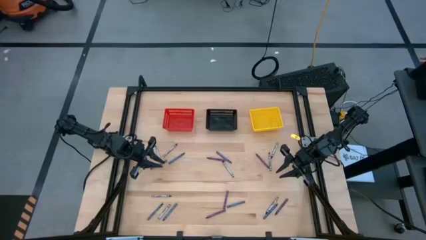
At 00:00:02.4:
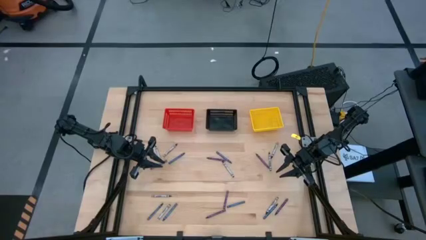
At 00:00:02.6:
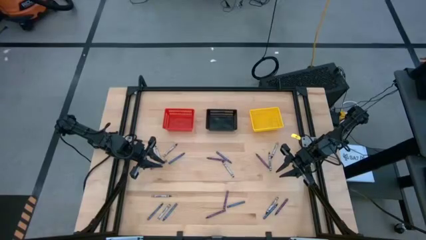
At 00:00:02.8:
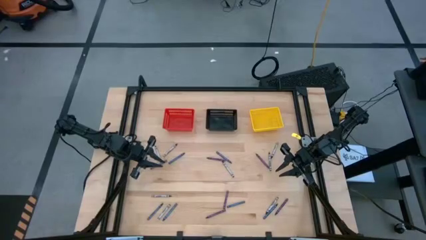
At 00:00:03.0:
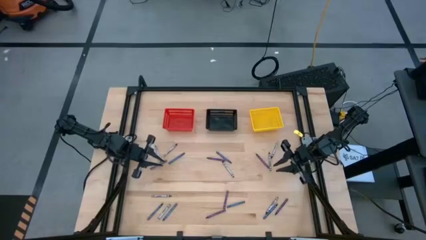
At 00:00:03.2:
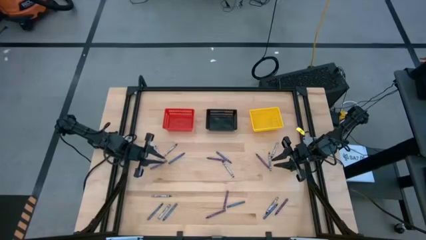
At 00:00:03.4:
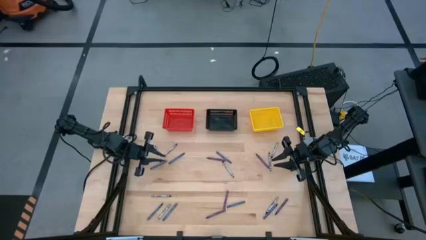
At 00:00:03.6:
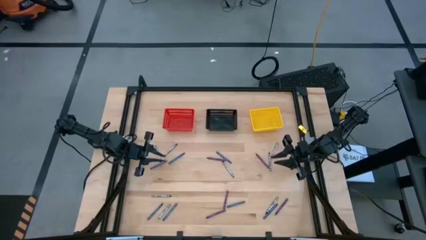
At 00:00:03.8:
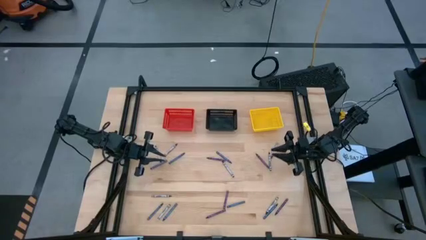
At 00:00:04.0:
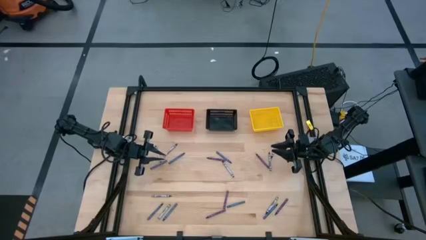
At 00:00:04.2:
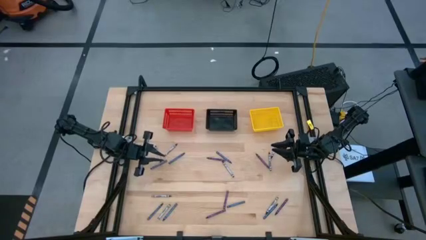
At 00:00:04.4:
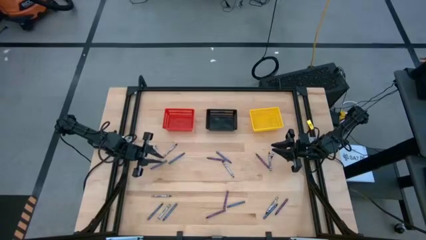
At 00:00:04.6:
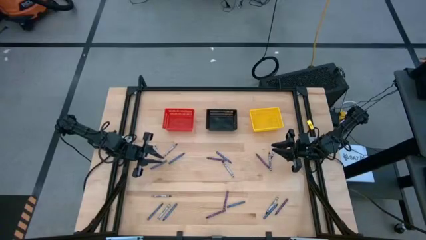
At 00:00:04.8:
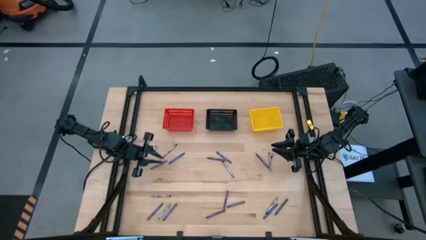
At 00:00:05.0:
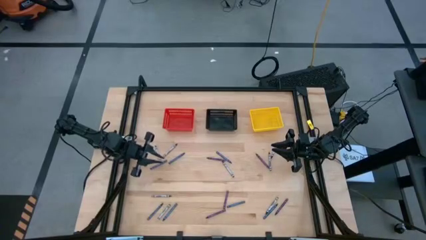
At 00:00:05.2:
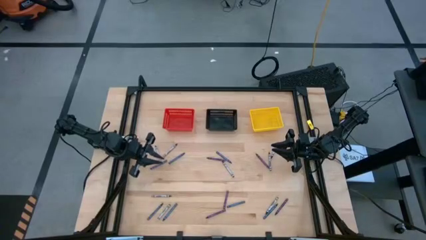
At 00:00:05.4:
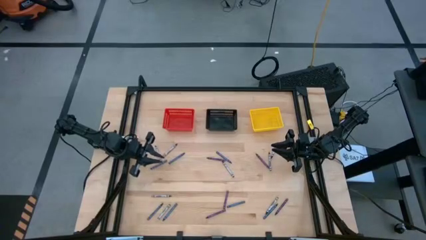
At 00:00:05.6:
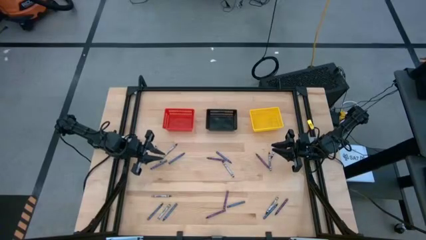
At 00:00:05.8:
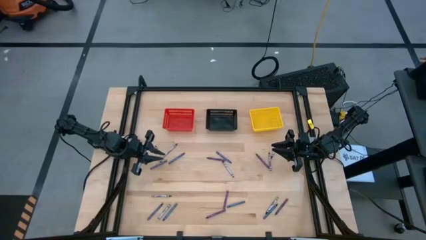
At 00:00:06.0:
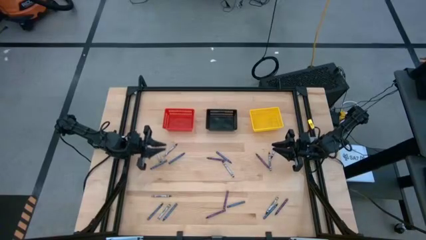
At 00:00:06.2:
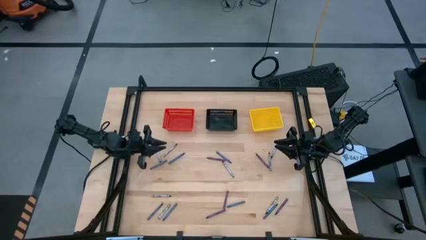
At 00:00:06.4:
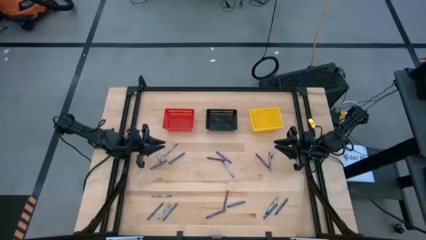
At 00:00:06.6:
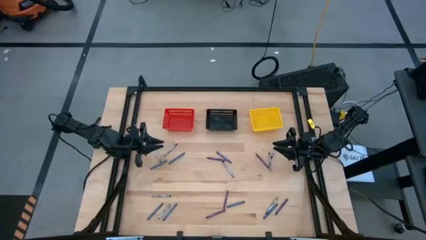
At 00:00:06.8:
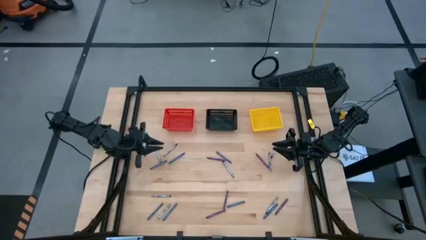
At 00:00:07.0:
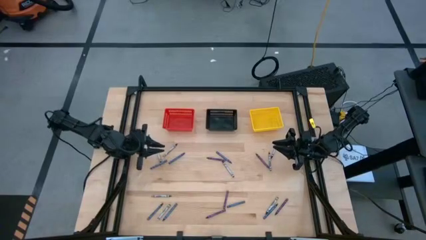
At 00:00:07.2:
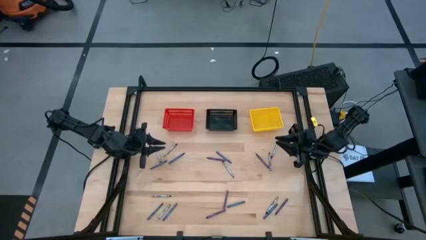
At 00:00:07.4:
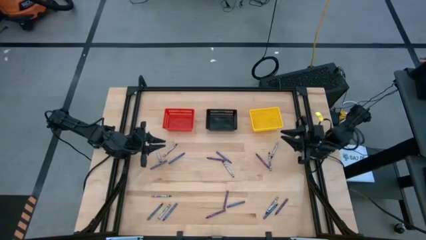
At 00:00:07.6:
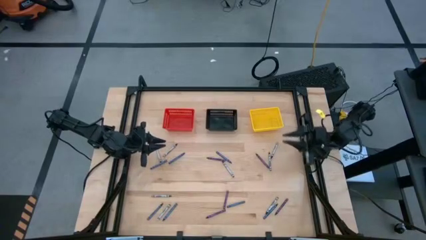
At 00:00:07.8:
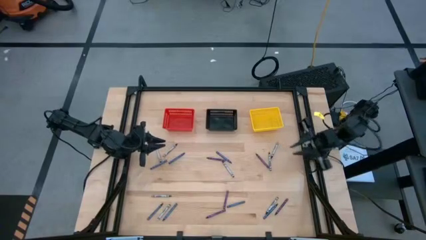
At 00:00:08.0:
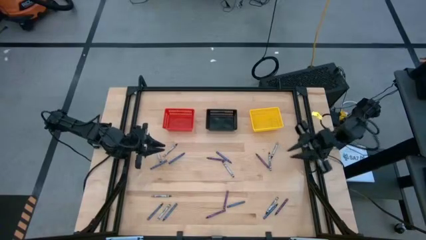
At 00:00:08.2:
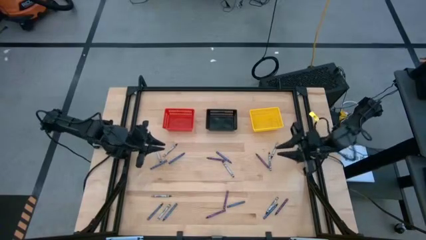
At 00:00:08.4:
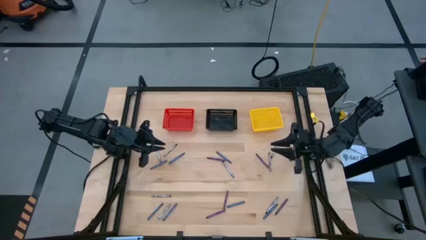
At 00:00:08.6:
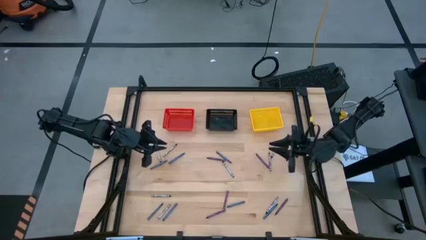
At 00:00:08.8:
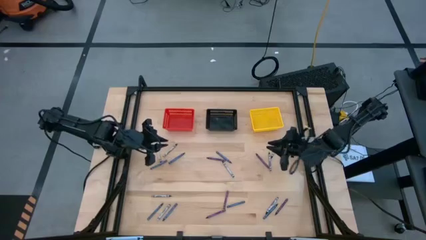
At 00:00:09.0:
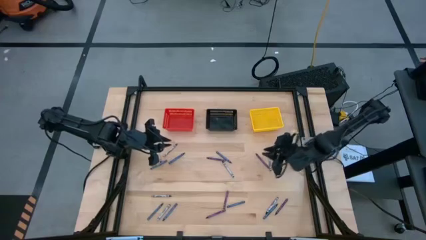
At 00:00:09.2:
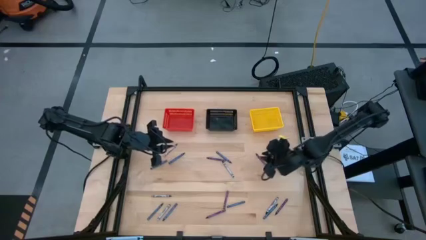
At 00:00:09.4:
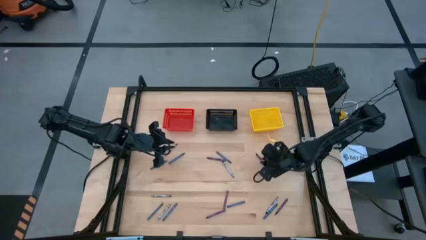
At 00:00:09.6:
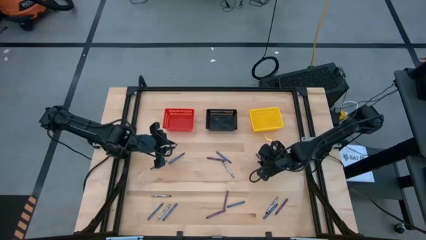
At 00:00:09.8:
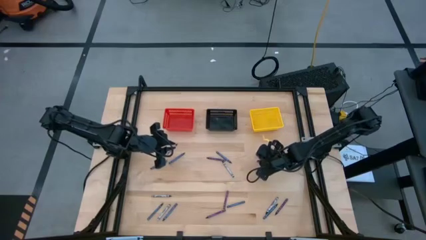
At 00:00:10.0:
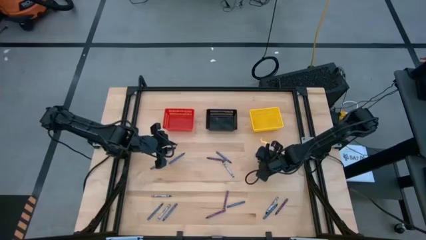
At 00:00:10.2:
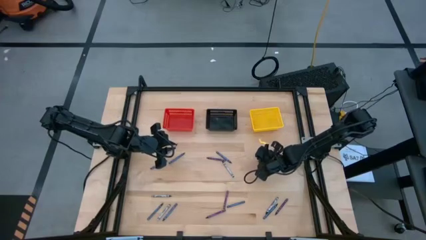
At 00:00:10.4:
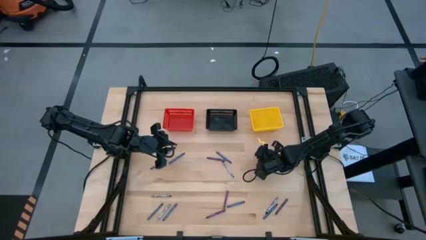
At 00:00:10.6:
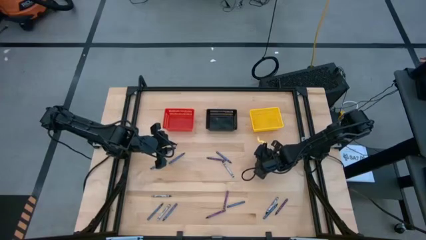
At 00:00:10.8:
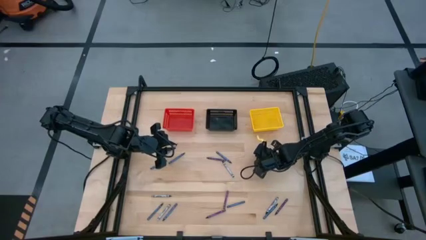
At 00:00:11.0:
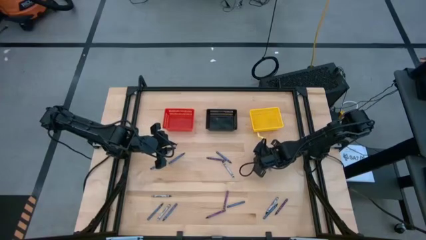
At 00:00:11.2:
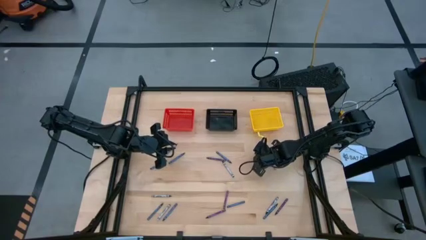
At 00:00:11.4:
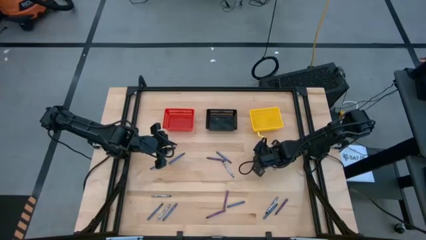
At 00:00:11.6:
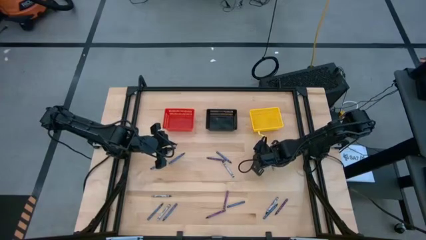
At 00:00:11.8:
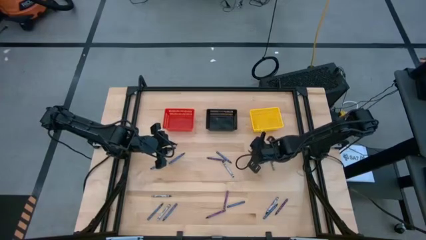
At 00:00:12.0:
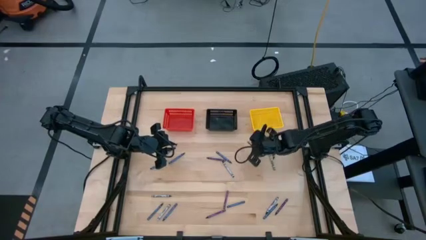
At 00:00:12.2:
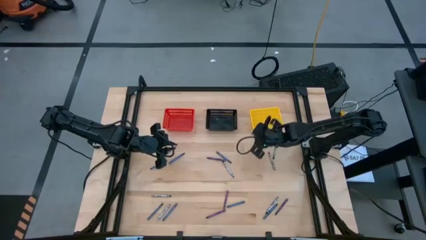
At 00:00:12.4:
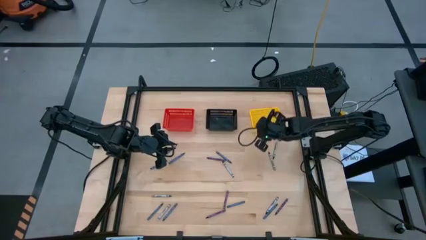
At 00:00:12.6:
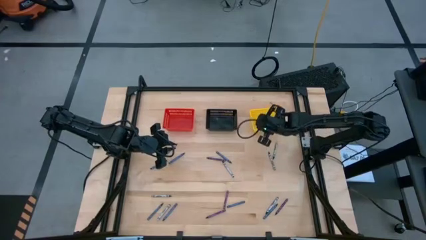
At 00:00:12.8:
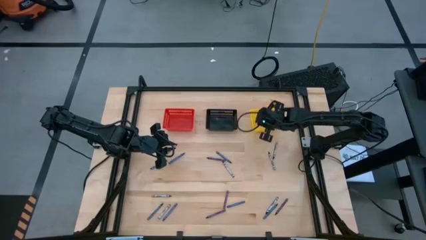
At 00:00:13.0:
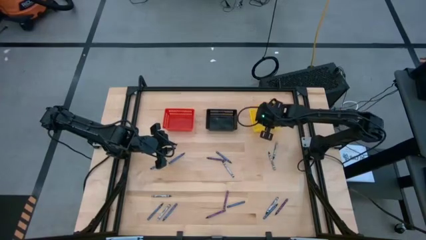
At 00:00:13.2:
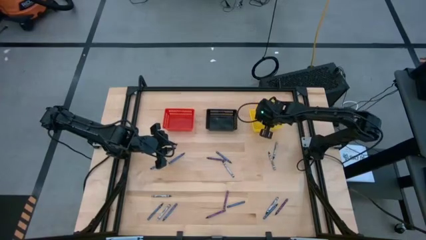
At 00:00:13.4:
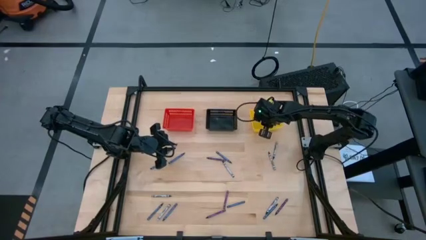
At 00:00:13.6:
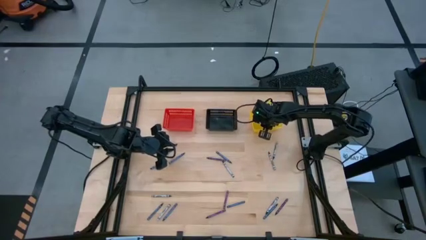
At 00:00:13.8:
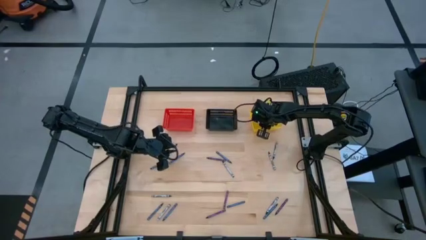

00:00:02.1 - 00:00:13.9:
Task: Sort crayons
Put the purple crayon into the yellow basket

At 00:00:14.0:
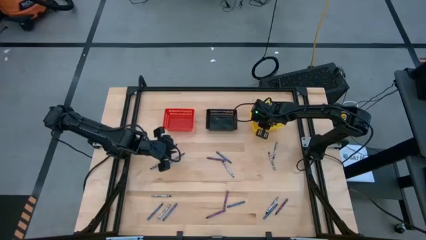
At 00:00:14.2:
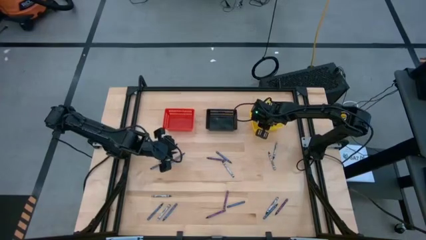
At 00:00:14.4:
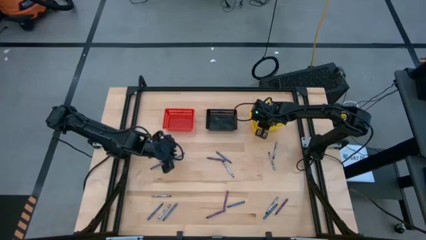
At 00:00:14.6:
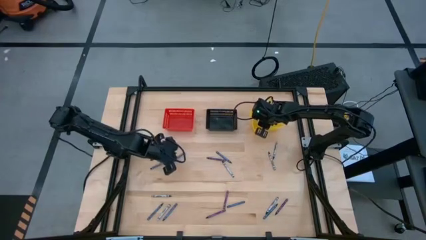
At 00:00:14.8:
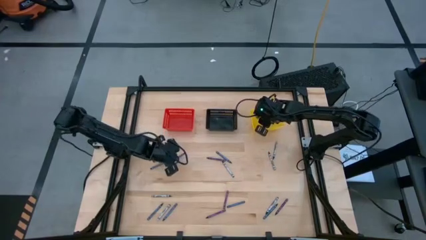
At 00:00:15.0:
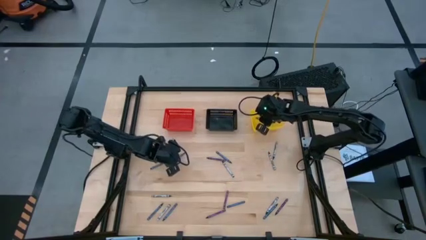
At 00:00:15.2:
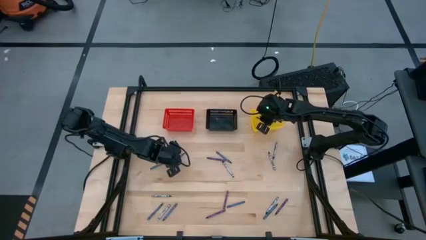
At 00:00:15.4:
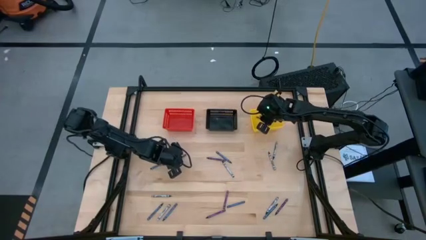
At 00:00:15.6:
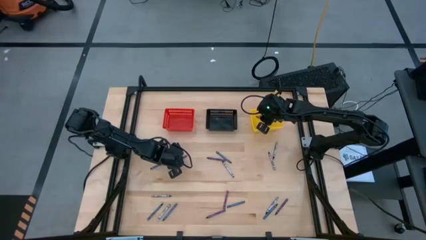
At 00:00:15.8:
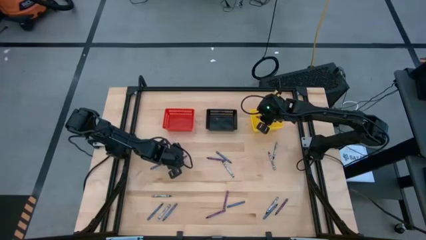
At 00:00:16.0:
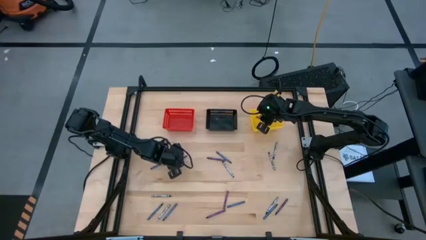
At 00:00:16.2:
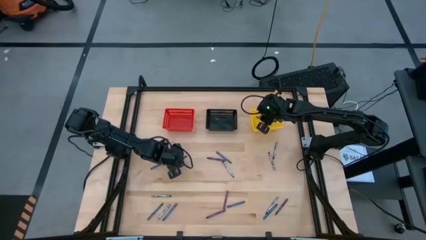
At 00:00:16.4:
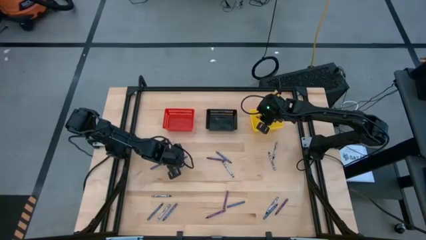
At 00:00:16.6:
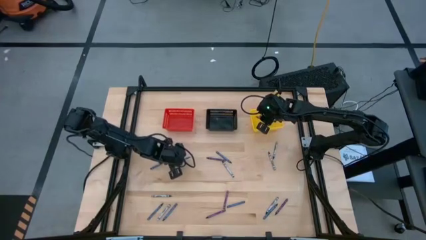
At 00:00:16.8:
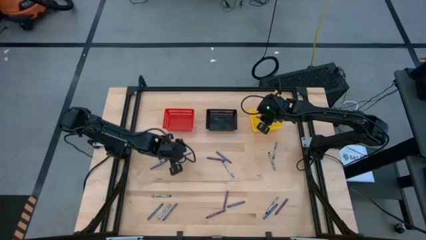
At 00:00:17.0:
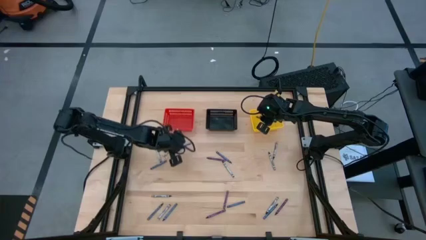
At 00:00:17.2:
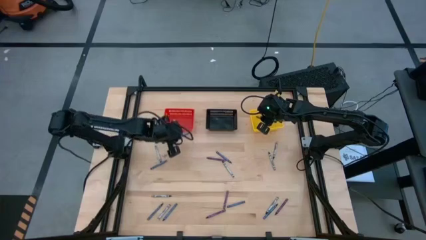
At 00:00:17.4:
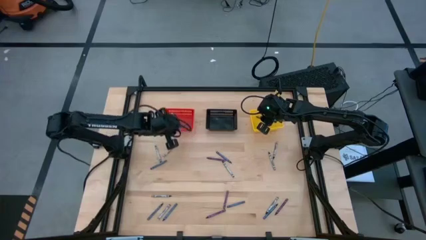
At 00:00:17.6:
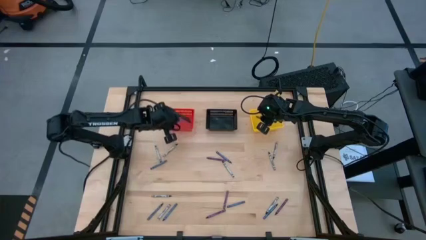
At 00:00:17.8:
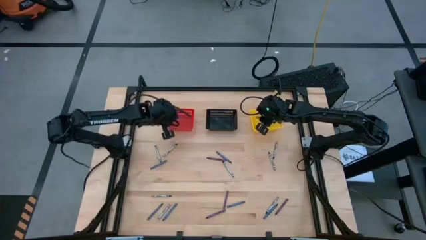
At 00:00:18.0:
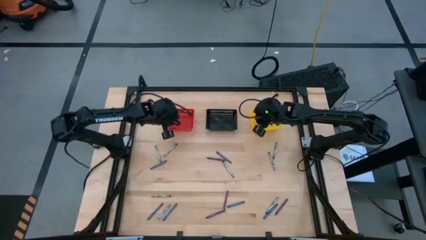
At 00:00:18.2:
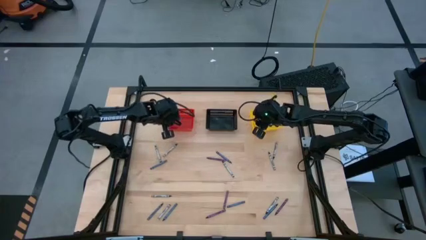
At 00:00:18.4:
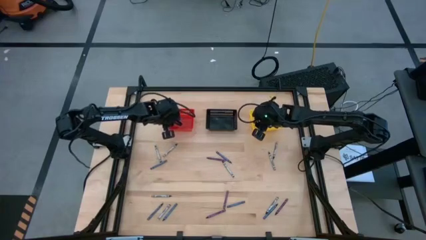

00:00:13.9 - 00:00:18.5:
Put the blue crayon into the red basket
